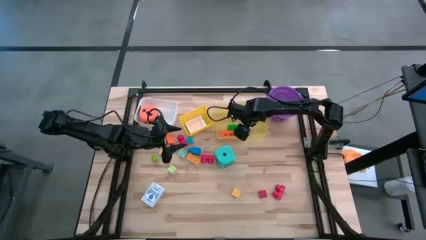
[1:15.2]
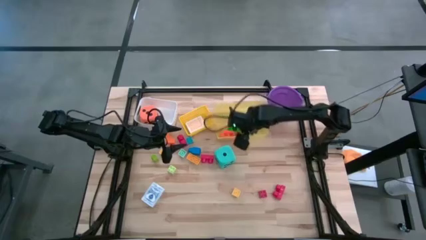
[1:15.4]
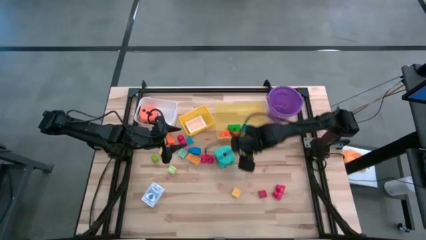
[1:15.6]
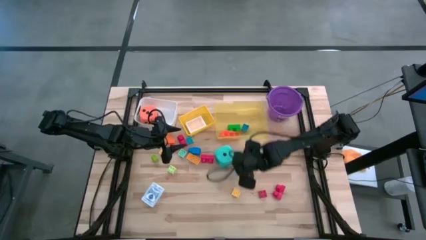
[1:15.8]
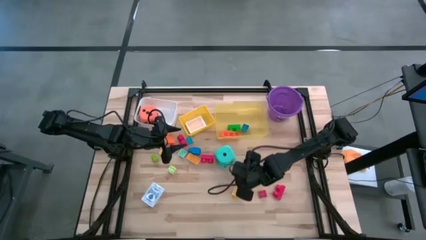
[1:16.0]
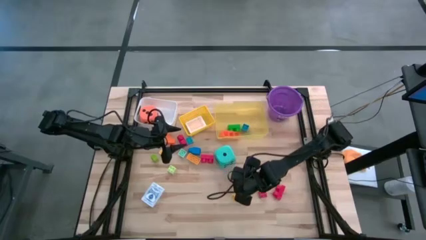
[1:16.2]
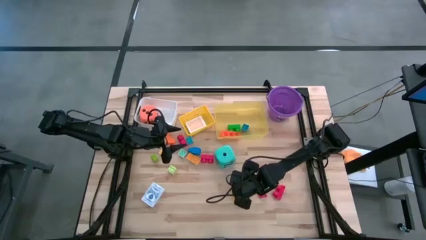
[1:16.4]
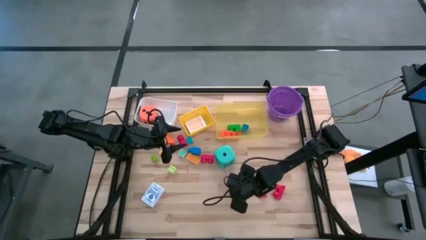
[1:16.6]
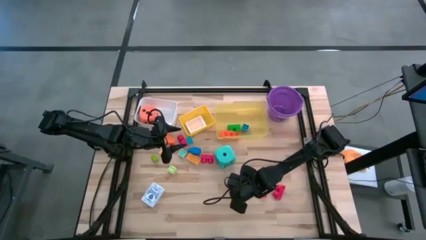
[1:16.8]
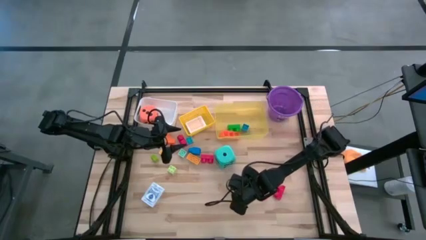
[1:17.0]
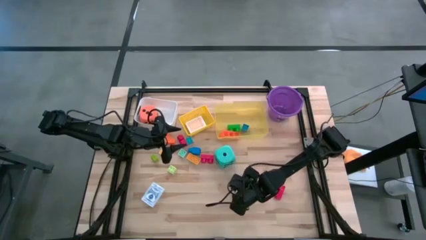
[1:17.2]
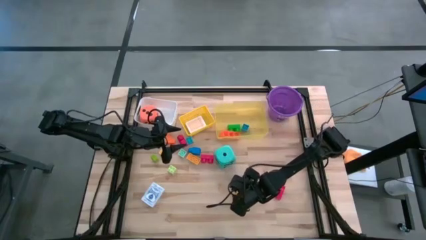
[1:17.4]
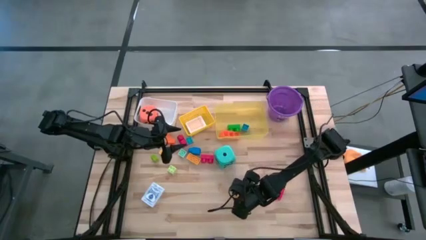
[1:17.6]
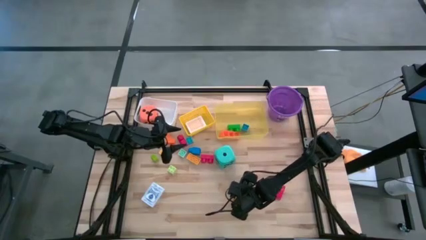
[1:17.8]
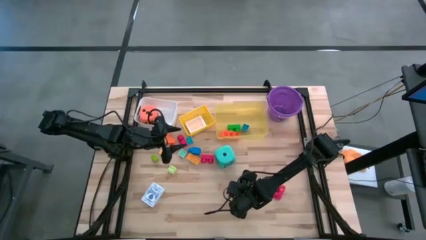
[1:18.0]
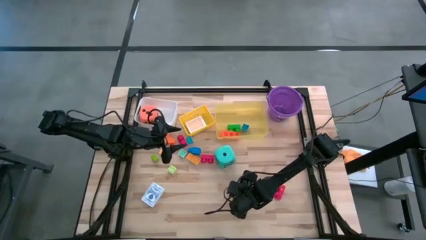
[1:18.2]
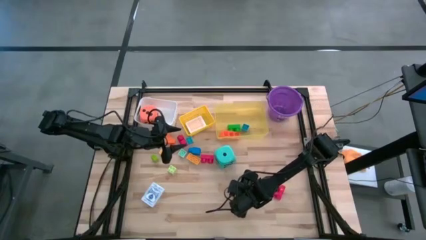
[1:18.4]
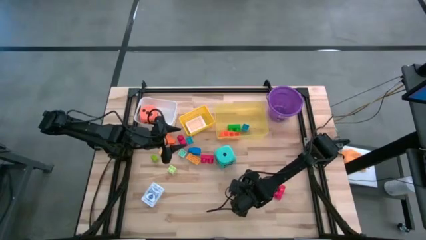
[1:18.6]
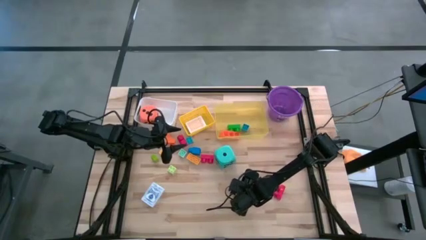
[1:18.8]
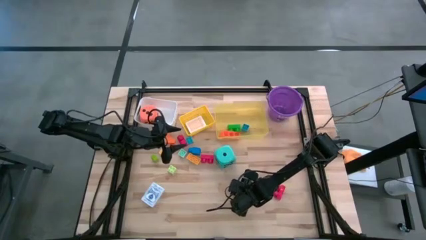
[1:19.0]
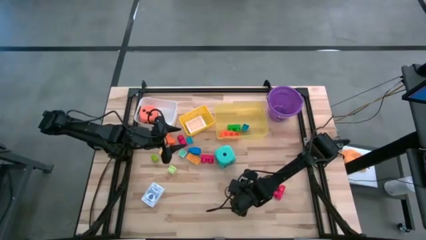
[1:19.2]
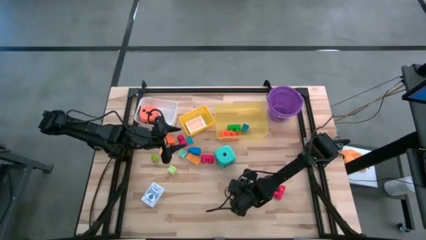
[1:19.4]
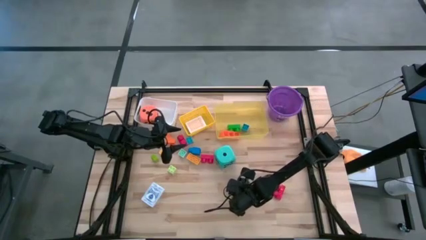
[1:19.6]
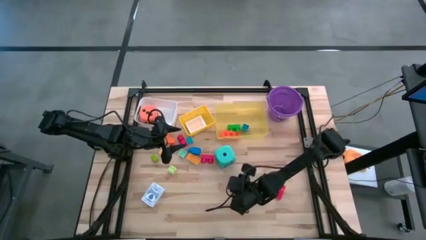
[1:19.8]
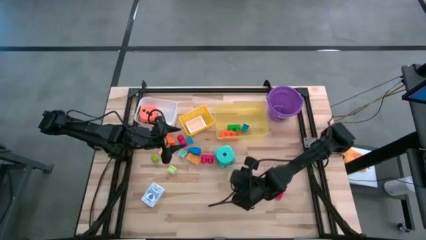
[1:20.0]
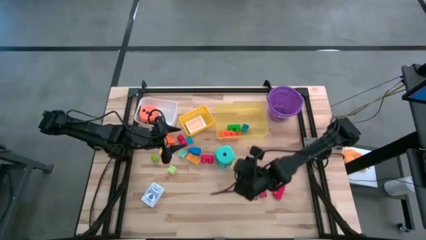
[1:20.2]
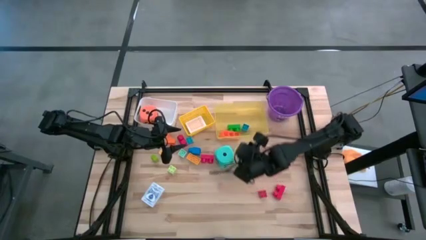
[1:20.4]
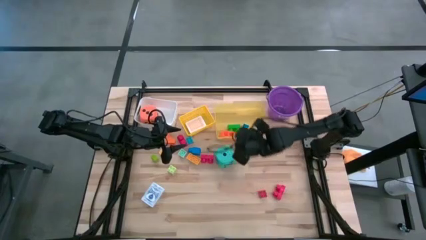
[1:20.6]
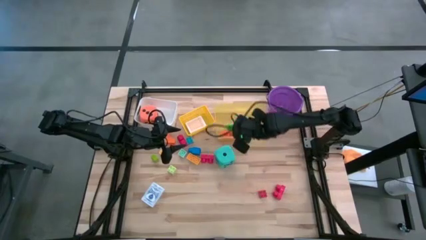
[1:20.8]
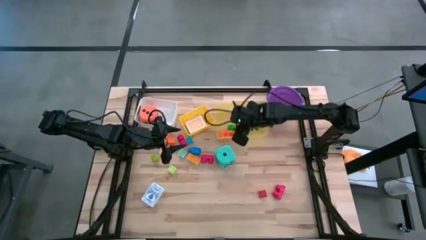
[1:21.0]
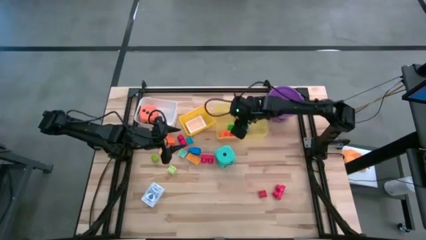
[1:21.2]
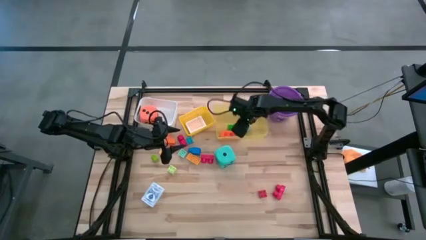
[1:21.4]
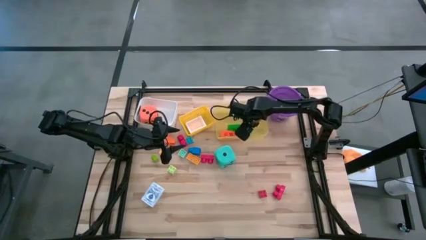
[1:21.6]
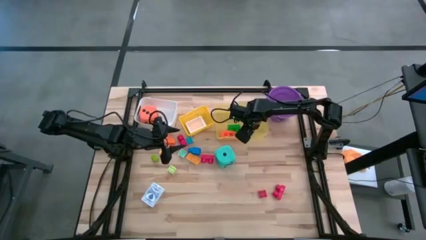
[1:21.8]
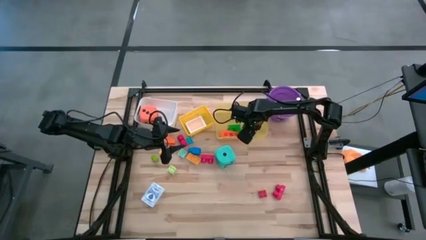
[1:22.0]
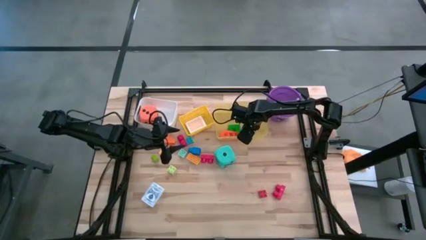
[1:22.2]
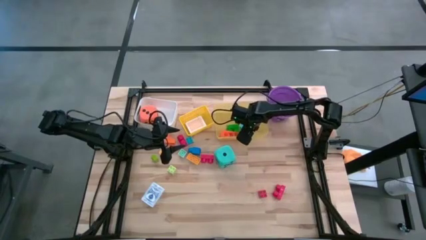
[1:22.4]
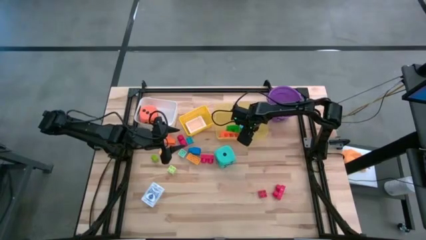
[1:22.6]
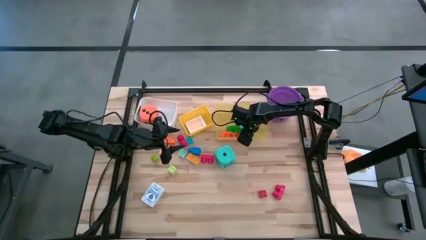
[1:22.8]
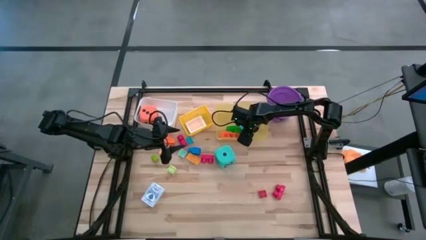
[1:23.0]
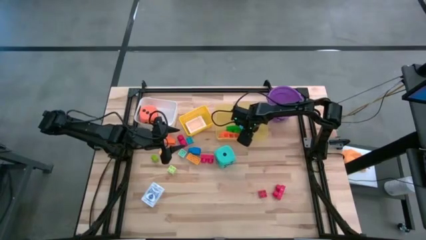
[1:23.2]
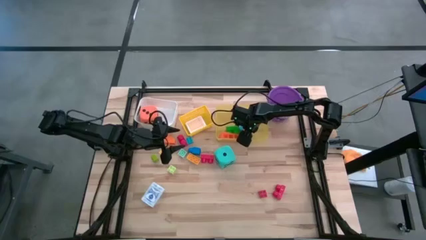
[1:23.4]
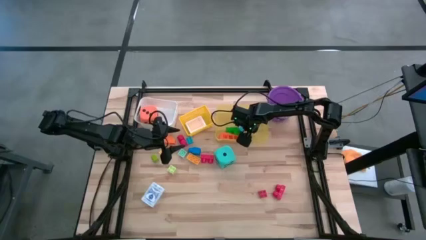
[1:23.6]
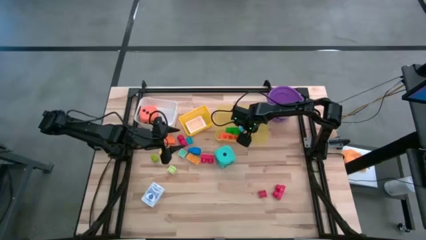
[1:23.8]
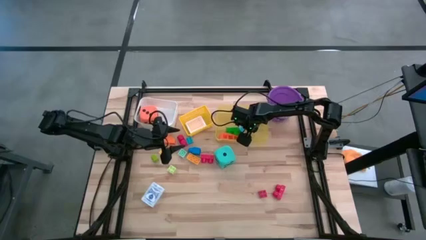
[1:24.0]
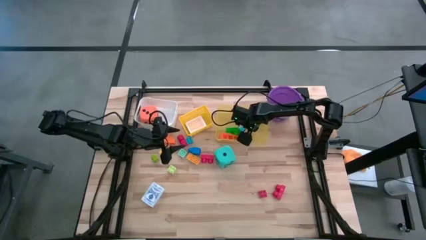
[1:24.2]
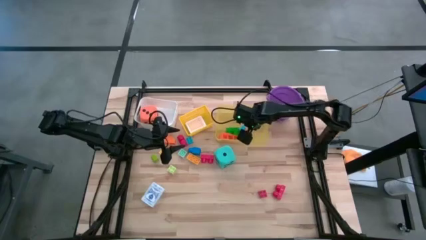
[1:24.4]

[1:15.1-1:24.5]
Task: Pick & Place Toys
Put the yellow game piece into the yellow bin

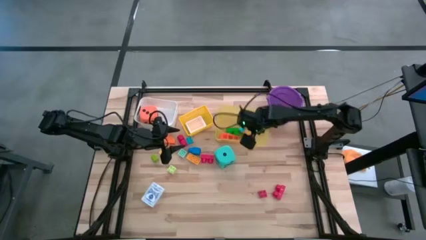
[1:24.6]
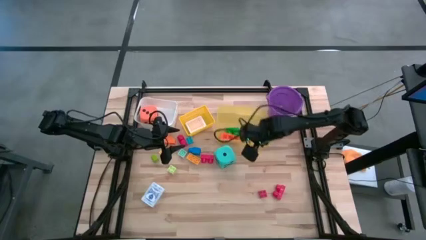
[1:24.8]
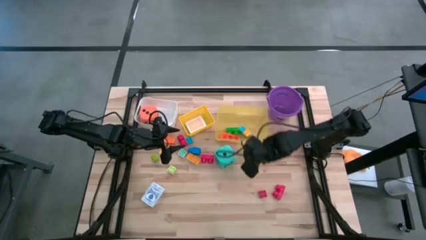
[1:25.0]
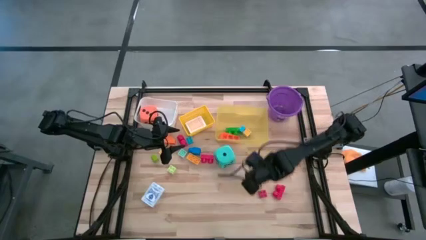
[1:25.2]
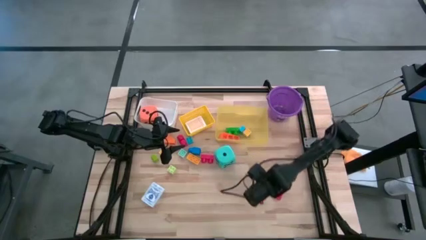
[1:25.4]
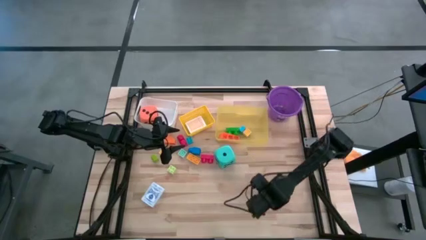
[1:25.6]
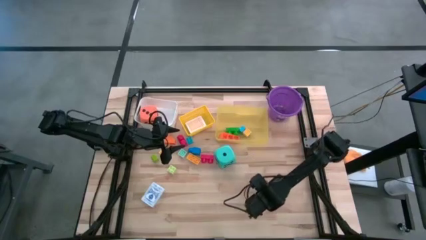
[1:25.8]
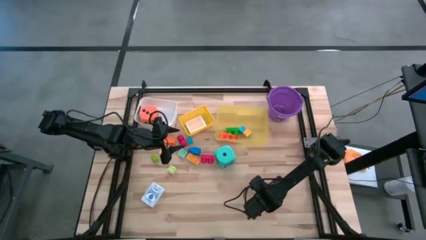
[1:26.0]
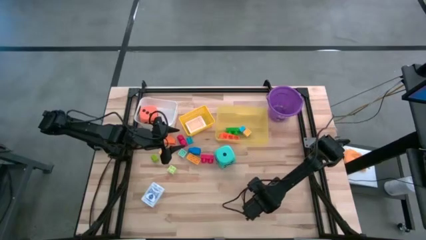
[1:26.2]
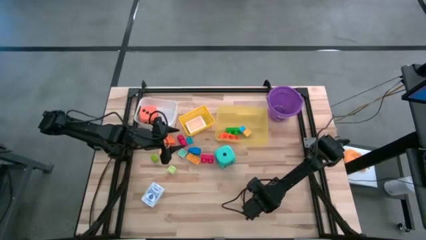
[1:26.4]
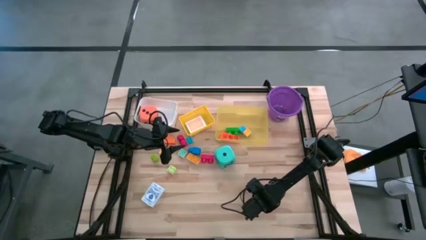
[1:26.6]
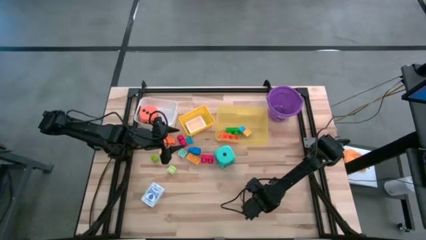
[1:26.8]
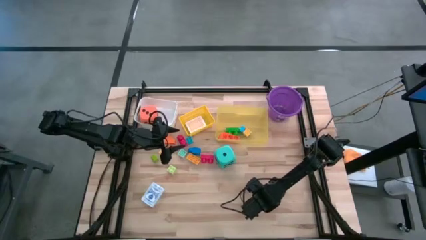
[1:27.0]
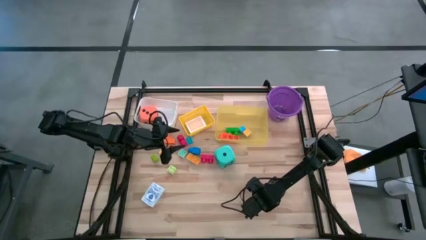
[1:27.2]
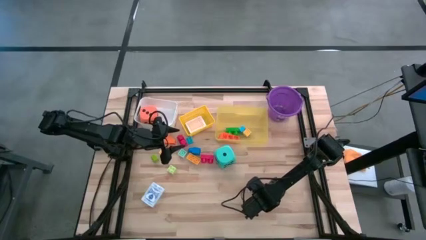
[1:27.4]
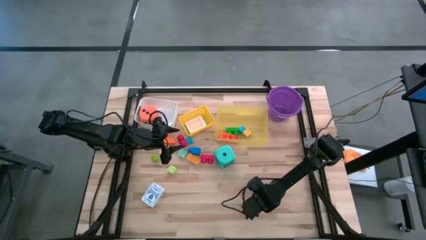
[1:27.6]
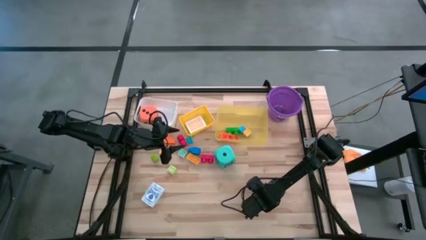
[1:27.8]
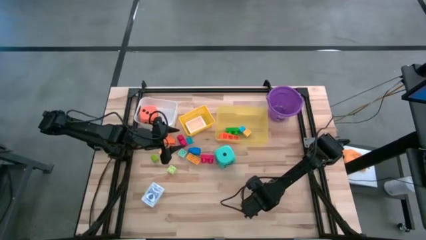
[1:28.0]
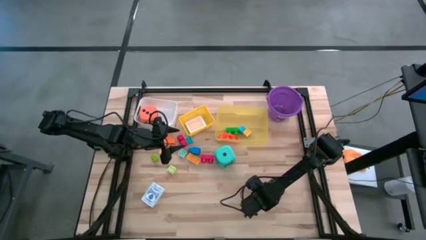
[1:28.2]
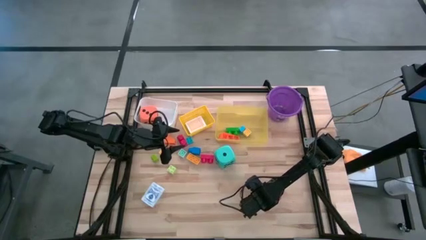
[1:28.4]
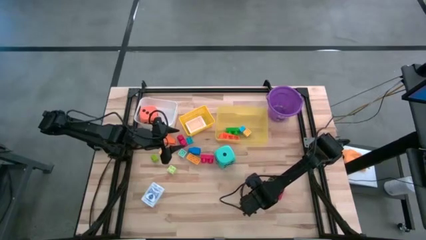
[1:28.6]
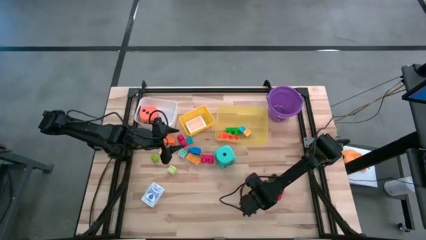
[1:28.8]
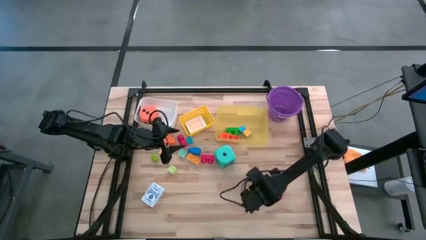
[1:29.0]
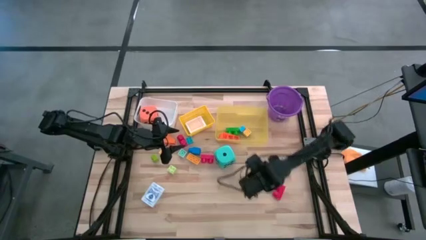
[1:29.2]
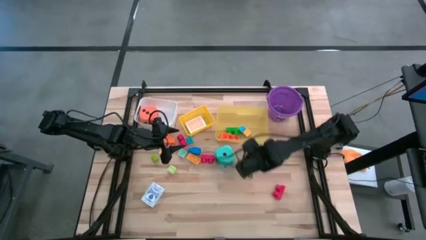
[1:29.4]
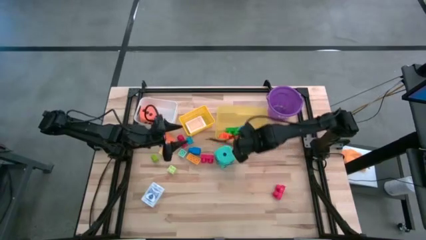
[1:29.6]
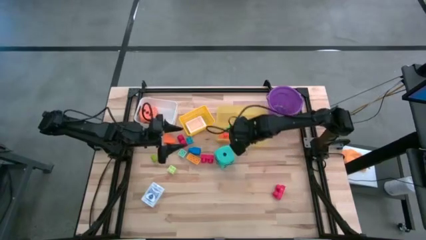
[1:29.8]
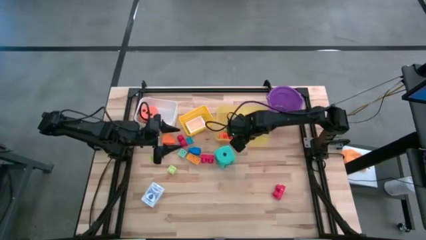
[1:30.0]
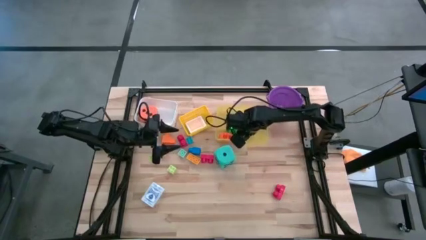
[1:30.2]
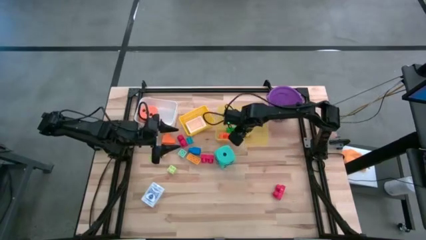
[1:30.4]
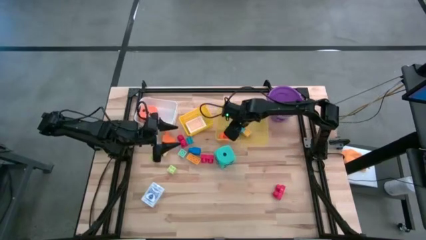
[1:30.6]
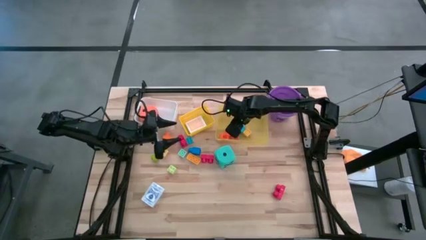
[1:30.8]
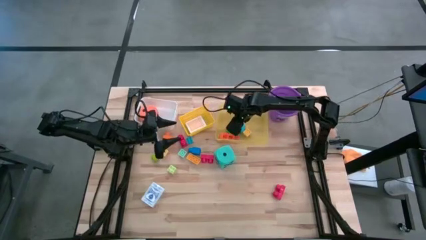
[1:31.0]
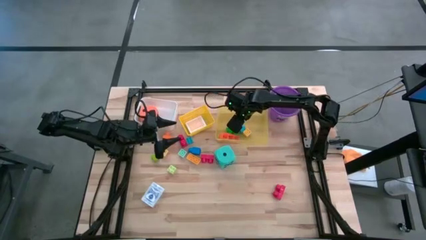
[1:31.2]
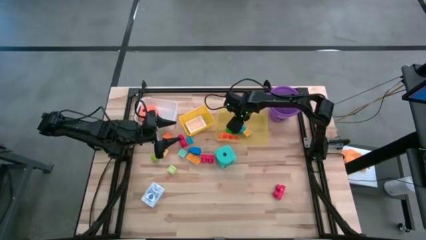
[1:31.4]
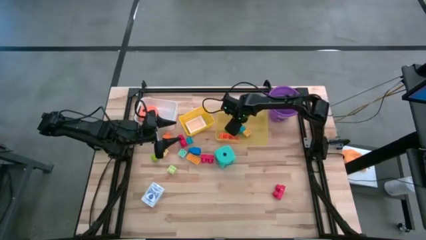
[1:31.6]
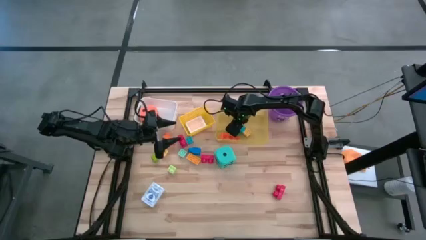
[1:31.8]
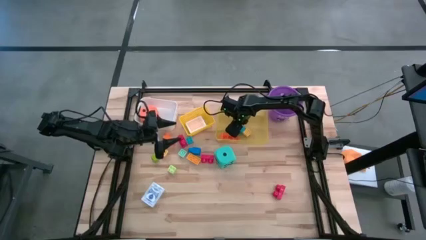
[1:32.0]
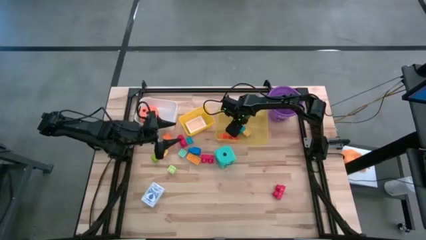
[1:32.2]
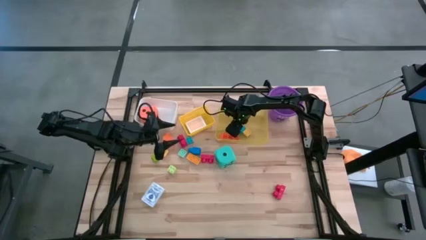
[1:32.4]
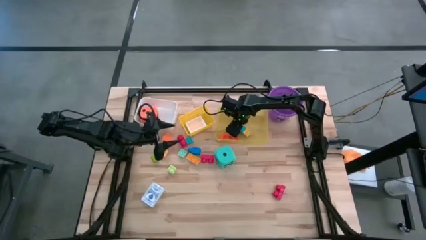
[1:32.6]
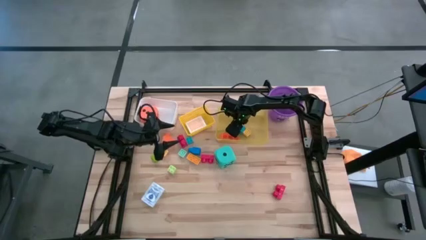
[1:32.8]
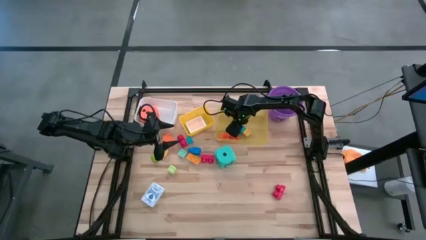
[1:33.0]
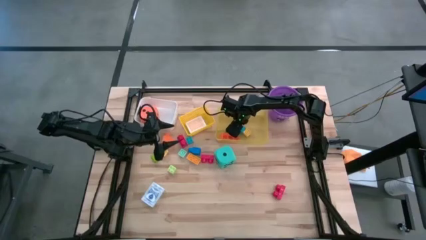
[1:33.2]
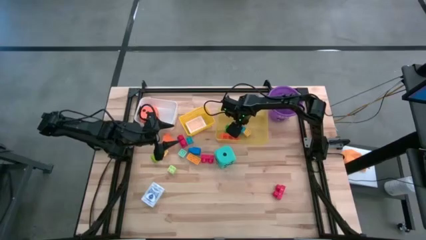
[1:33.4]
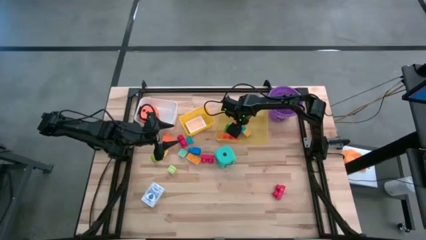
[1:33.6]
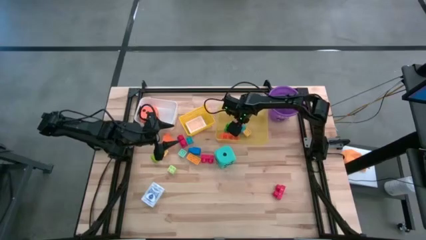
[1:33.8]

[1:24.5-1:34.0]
Put the red game piece into the yellow bin
